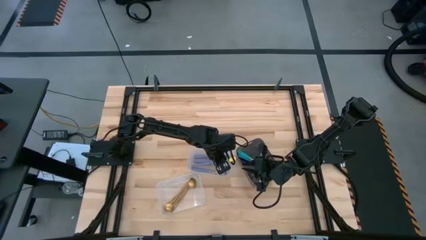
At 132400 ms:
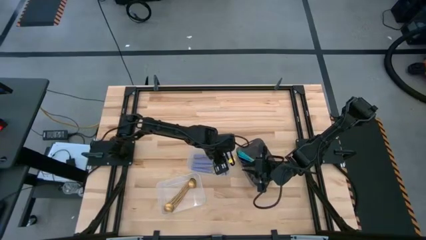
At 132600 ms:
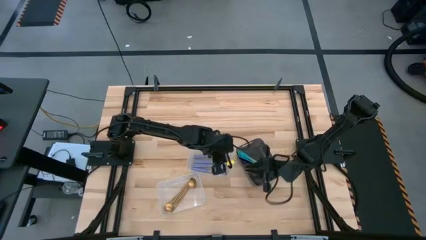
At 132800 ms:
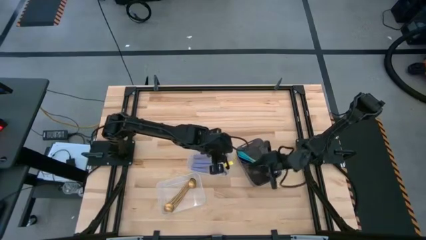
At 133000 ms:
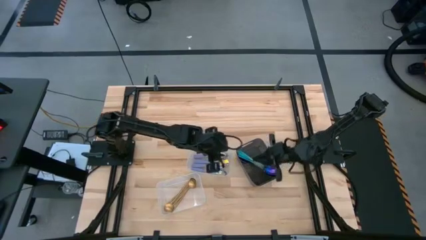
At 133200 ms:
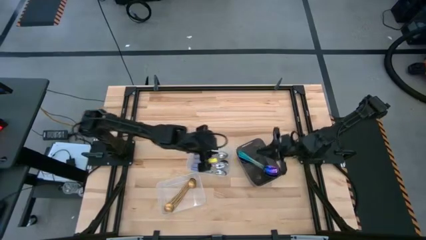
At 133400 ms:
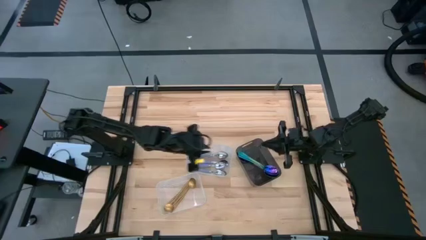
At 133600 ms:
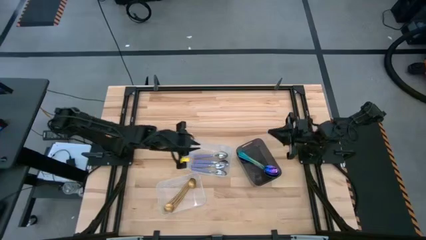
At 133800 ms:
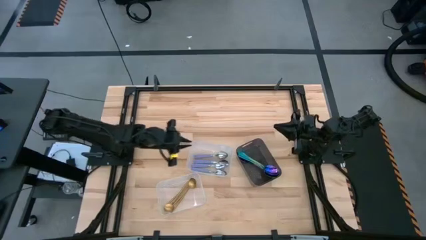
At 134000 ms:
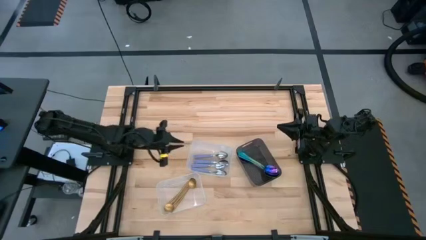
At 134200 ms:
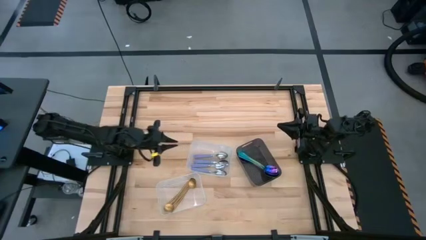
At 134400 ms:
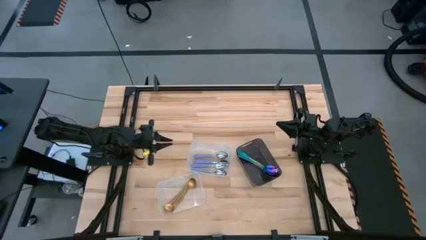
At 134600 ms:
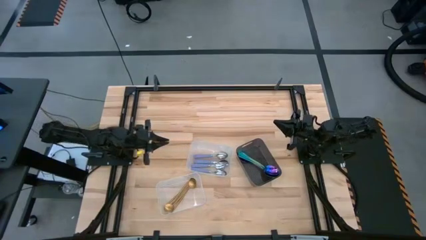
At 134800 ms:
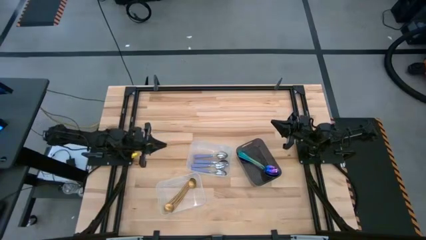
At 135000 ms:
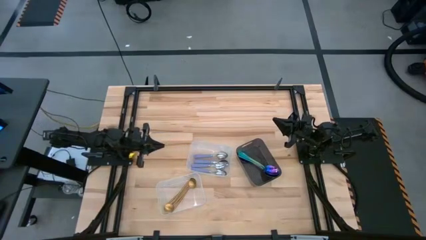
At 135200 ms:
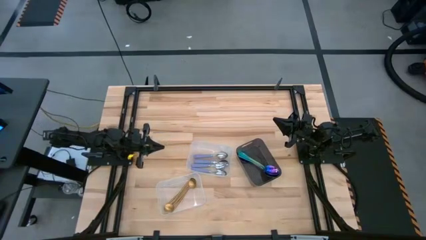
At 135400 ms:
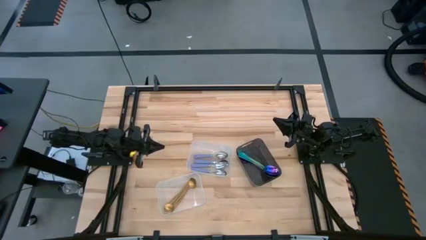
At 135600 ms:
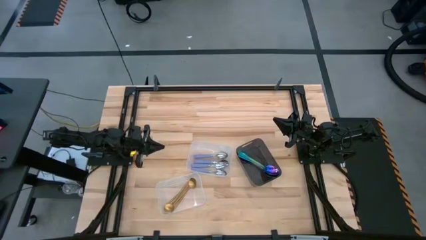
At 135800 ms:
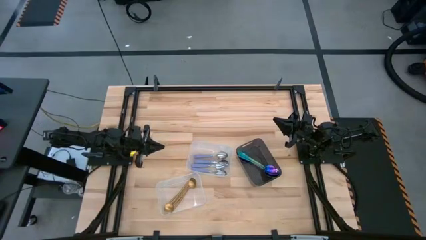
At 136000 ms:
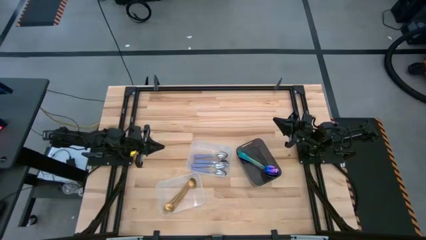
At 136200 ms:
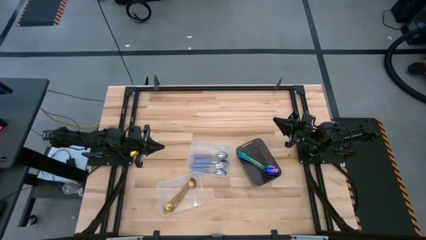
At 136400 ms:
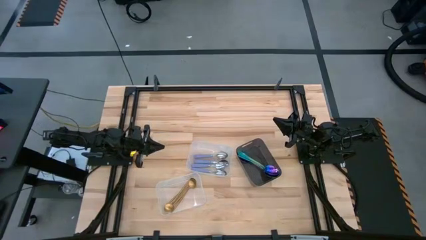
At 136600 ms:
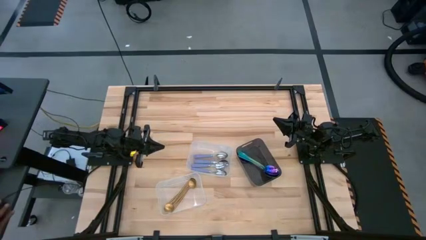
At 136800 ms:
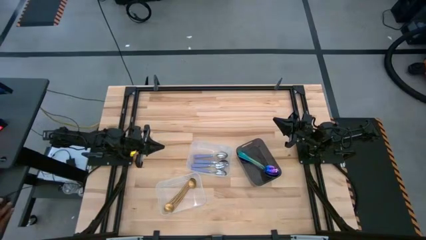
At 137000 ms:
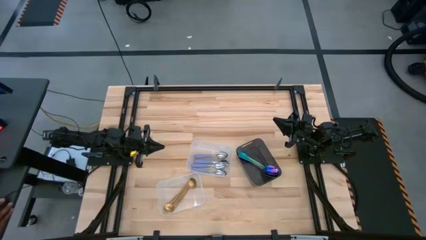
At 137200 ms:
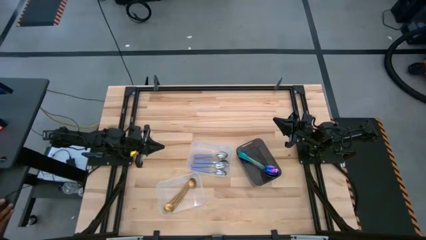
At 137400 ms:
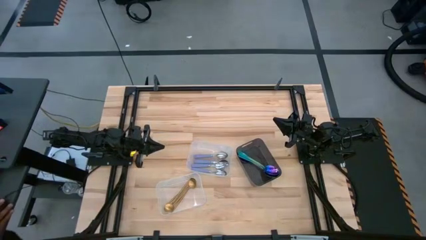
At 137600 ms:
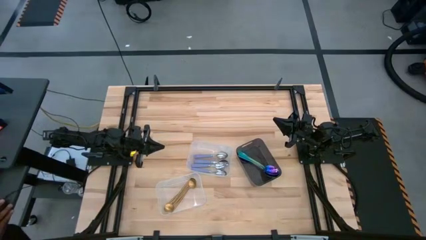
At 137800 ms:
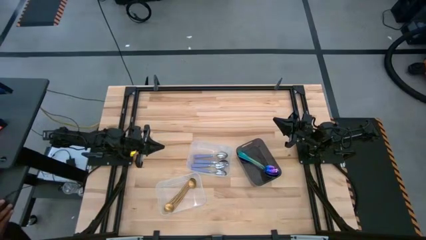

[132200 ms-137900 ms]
Task: Sort silverware by color (type)
Return to Home Position

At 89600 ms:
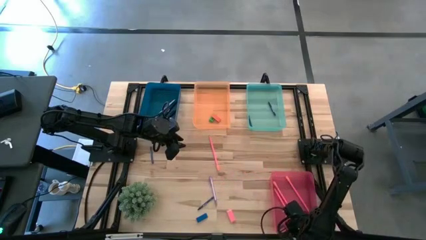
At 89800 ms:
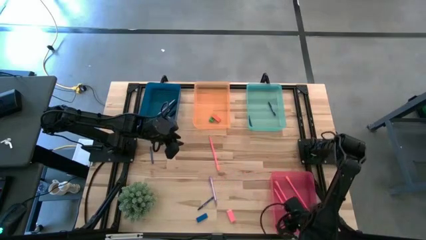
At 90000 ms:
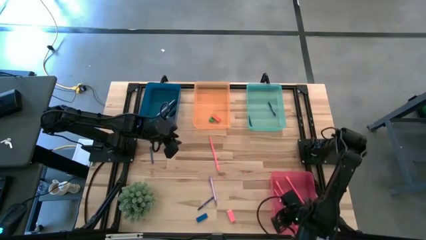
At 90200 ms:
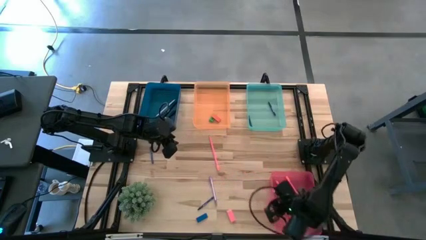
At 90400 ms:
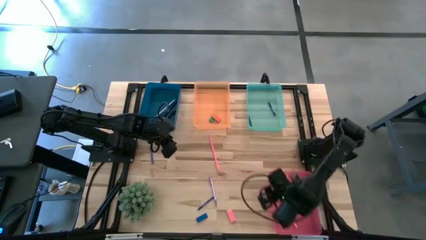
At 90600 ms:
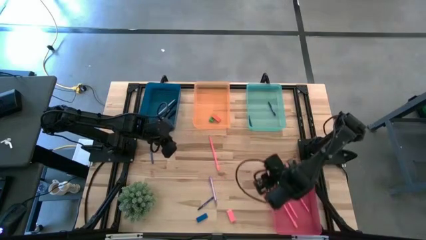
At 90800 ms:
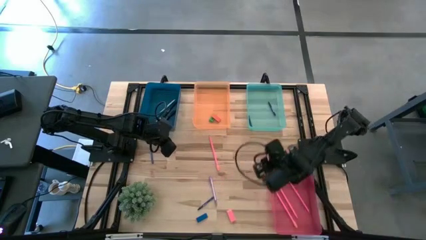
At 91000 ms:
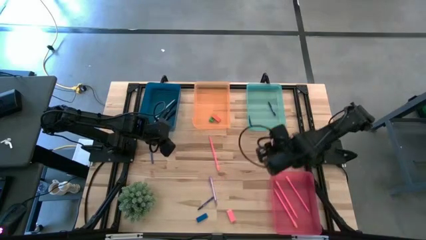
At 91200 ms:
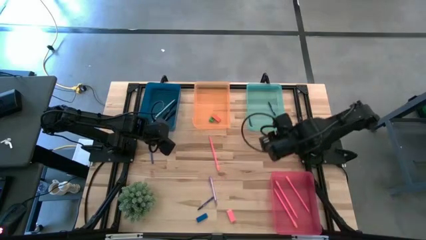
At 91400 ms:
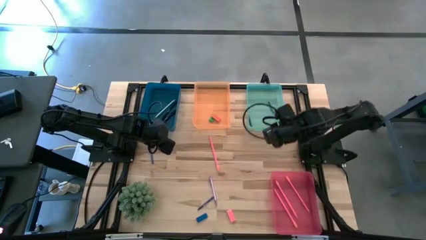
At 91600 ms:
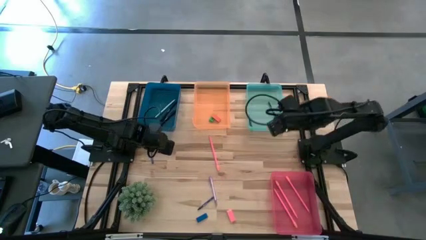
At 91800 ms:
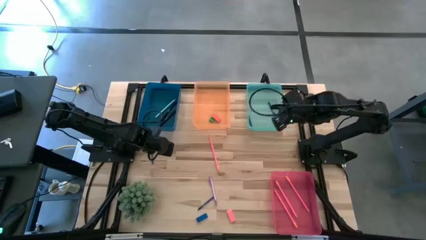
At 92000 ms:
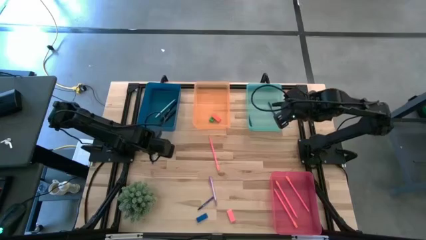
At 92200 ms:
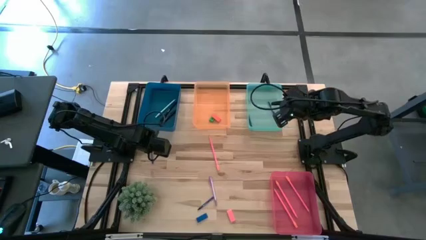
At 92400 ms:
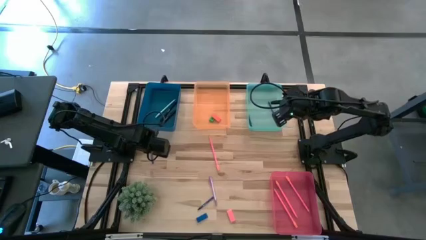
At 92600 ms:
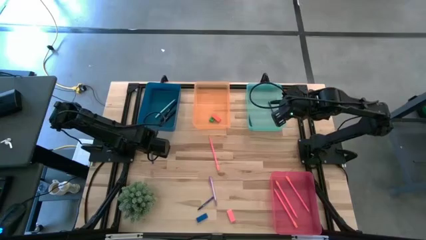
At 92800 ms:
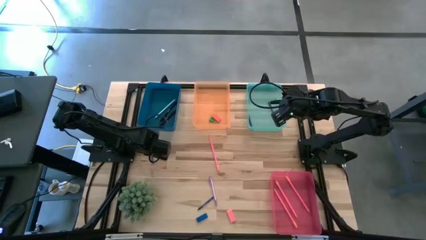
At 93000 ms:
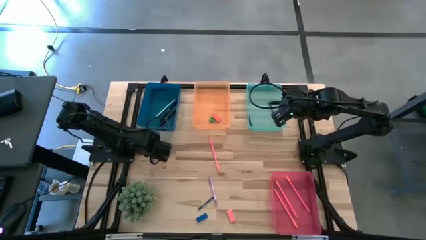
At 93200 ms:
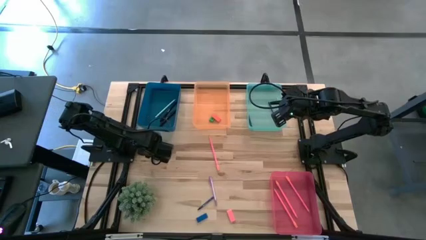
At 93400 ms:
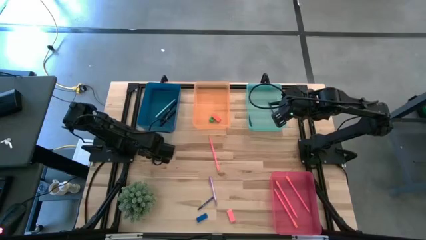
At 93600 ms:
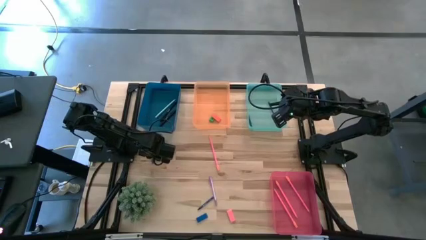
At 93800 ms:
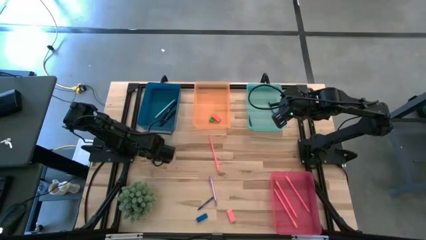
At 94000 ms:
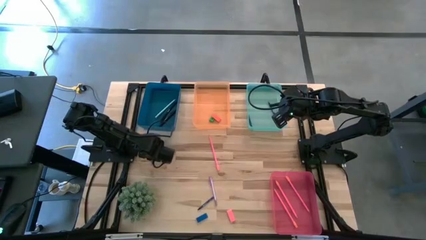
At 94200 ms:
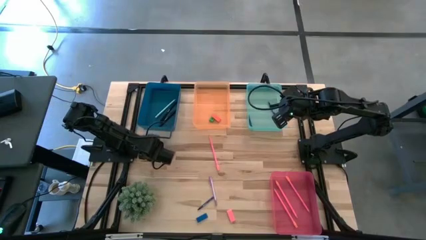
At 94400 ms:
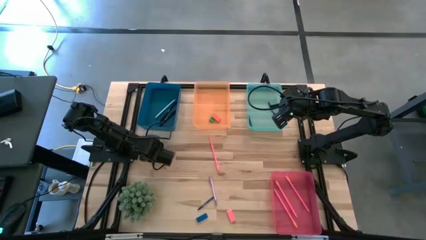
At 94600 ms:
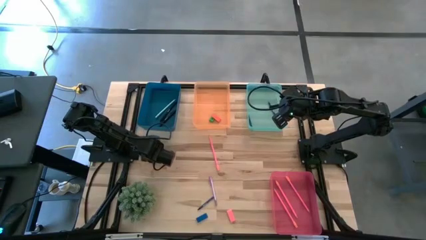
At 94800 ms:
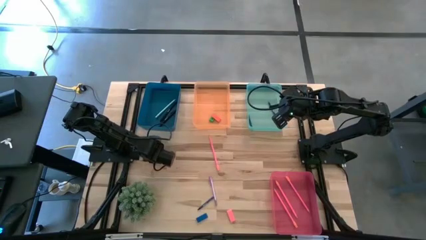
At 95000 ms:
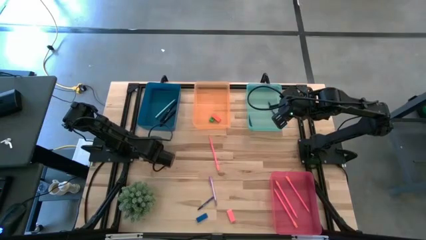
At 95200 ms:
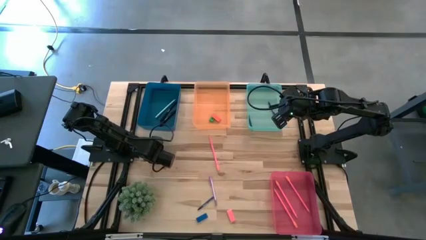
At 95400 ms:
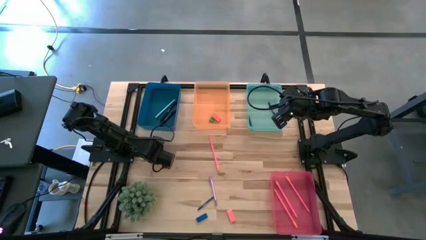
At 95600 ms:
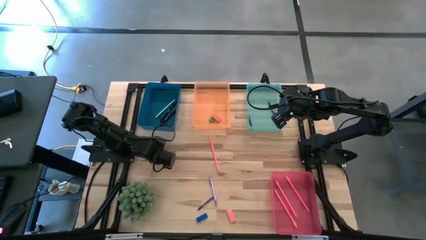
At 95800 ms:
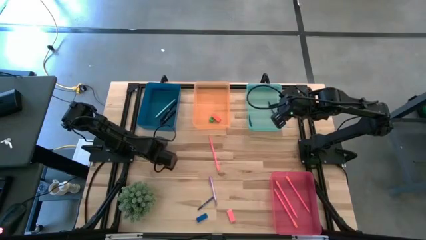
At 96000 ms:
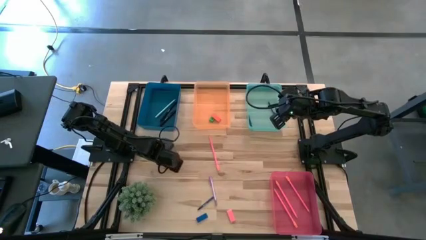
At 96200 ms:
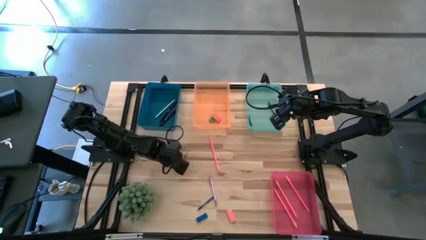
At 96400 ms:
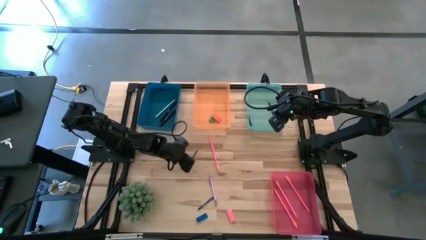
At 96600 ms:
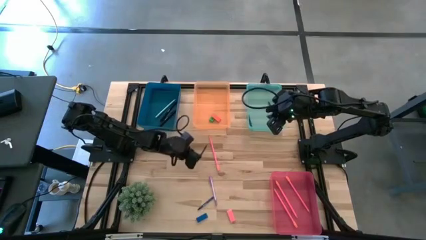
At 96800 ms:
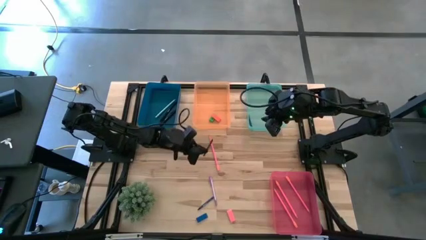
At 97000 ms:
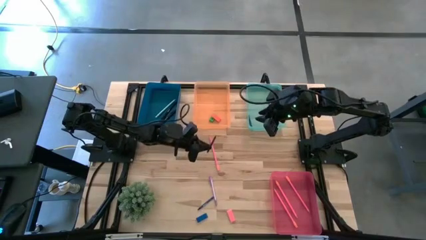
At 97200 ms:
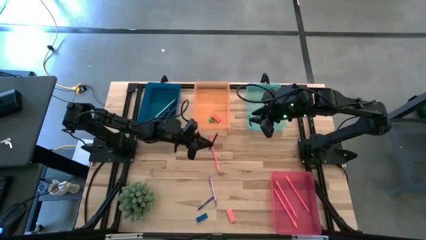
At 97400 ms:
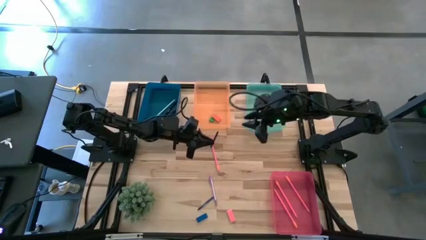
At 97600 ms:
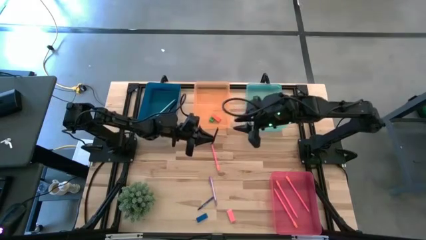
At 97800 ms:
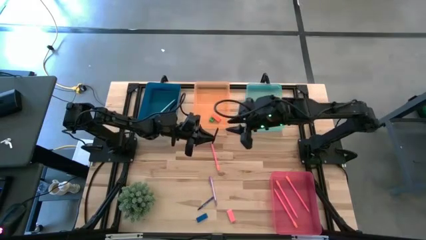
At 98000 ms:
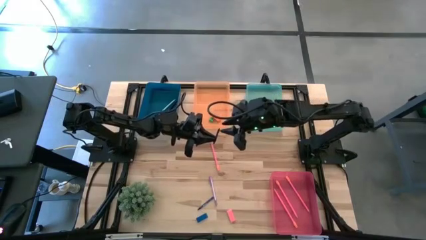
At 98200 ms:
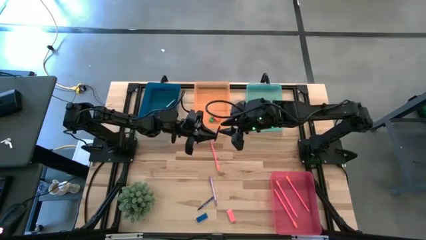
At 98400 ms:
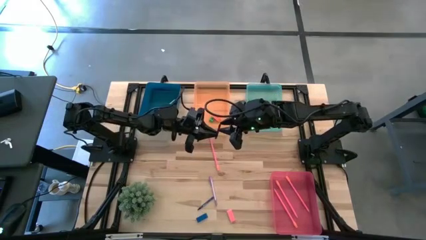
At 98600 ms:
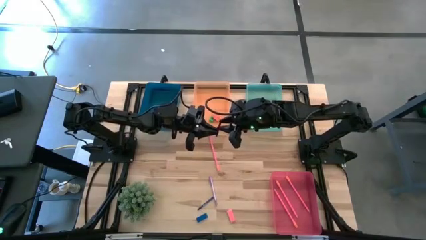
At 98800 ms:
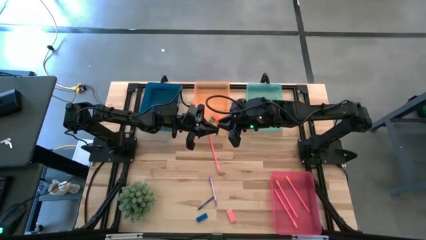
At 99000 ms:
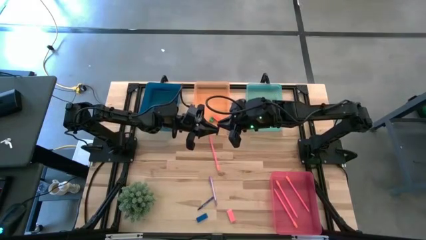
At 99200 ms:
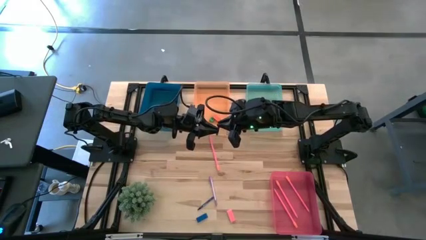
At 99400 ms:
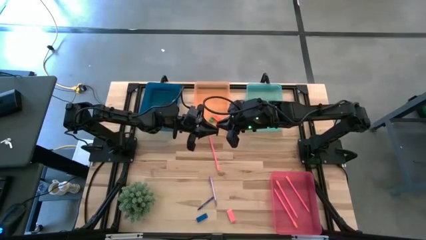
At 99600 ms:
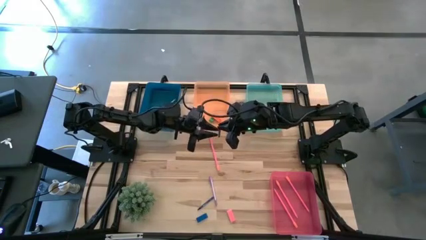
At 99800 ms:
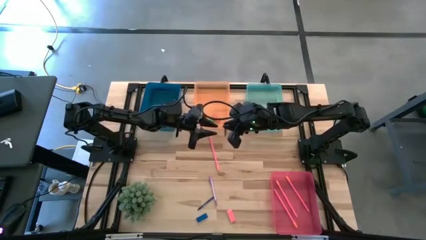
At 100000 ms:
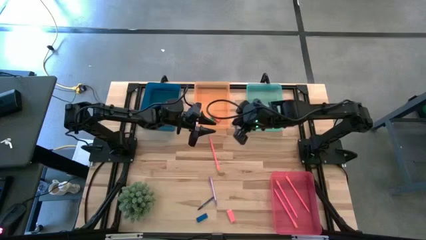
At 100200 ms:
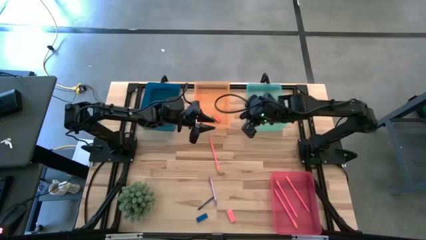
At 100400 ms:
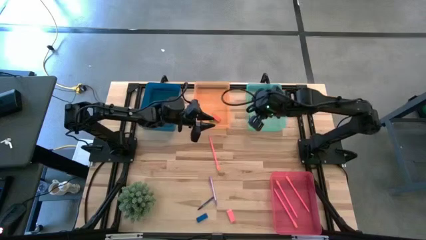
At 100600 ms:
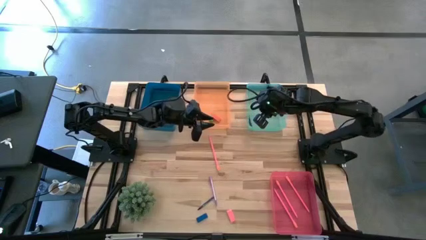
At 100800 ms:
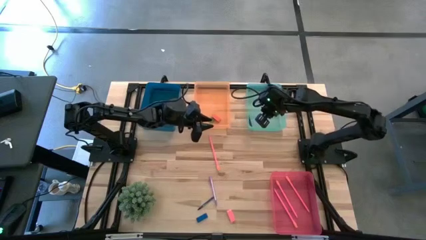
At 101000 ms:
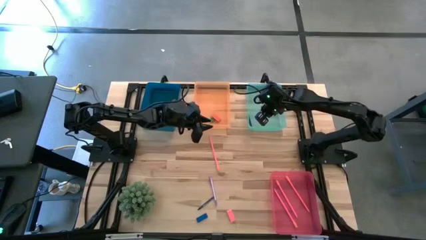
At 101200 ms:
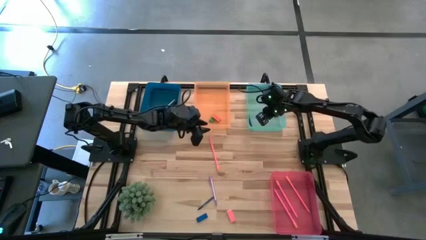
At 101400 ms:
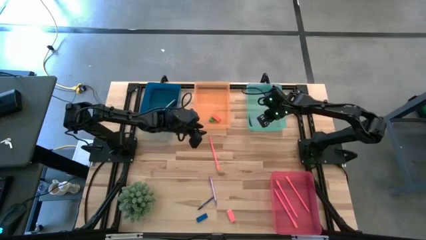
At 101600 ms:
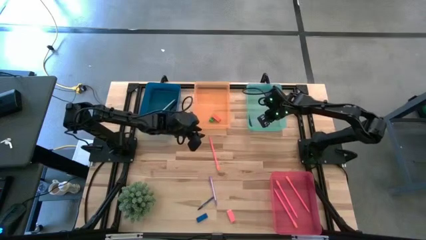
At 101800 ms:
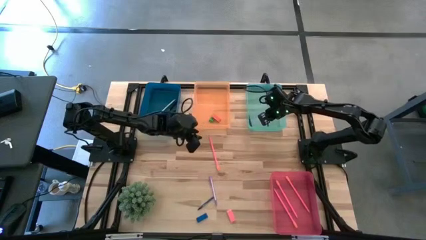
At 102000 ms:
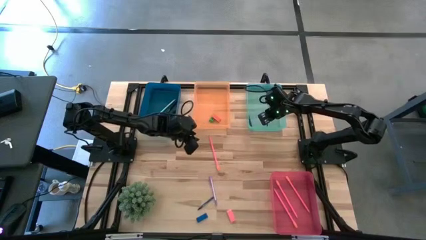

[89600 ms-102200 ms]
Task: Sort crayons/erasers/pens/pencils in bins
Put the blue crayon into the green bin
